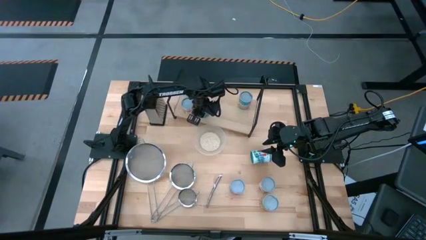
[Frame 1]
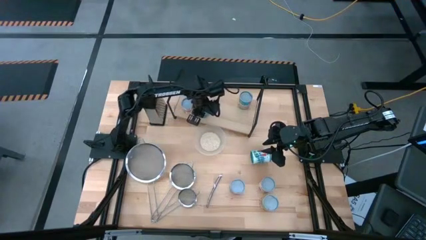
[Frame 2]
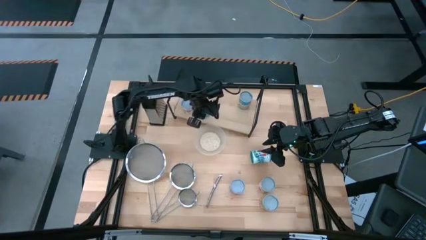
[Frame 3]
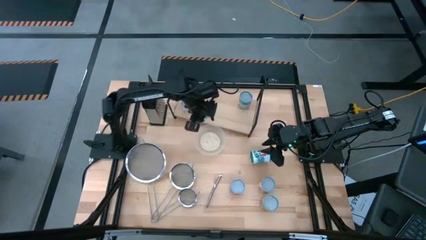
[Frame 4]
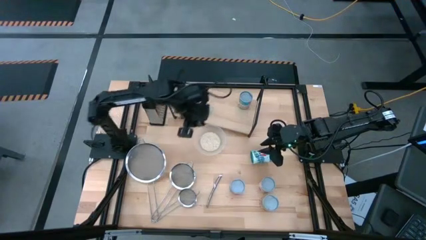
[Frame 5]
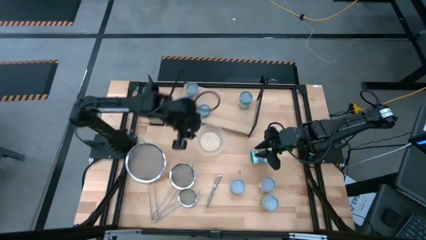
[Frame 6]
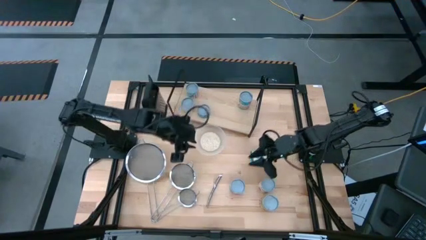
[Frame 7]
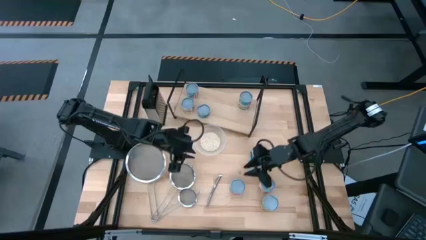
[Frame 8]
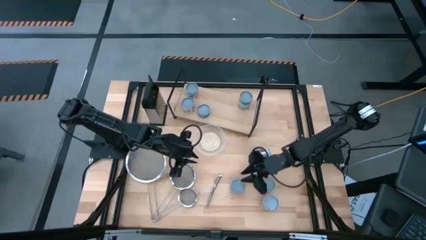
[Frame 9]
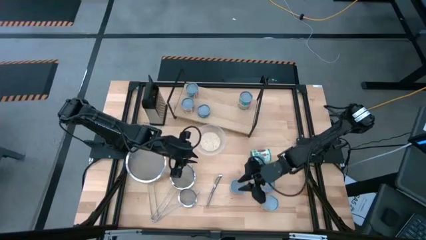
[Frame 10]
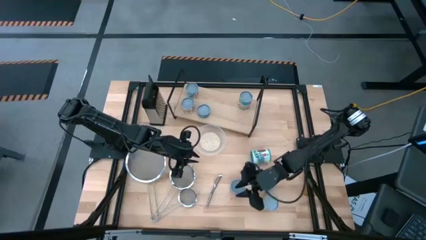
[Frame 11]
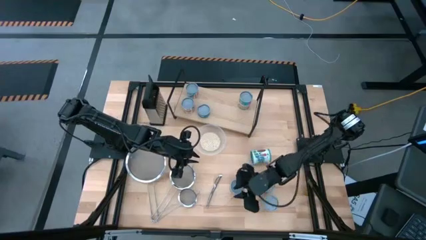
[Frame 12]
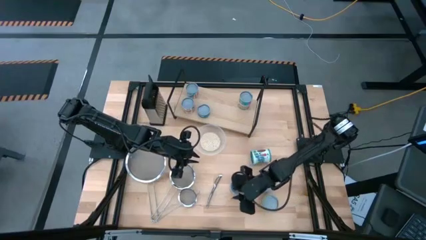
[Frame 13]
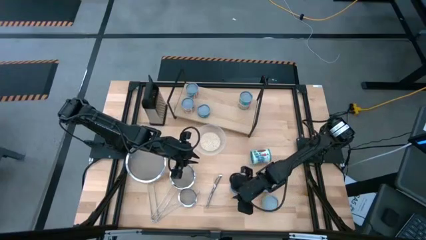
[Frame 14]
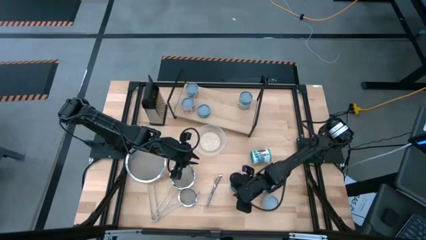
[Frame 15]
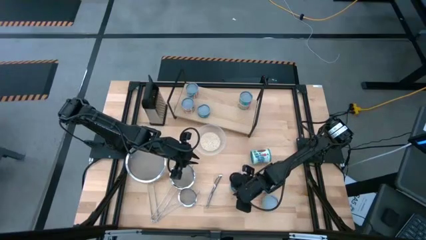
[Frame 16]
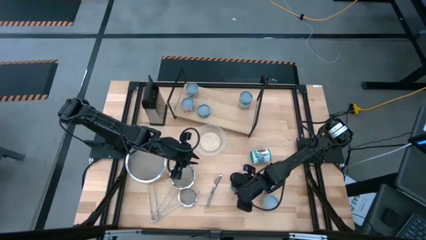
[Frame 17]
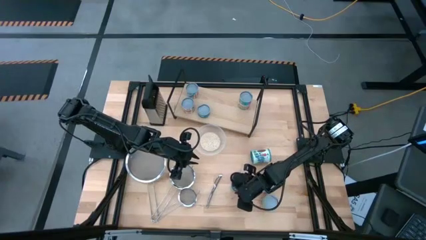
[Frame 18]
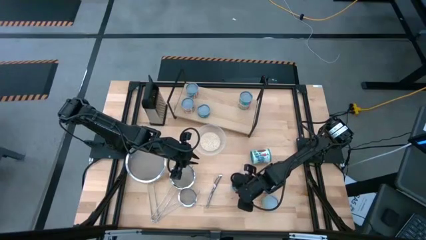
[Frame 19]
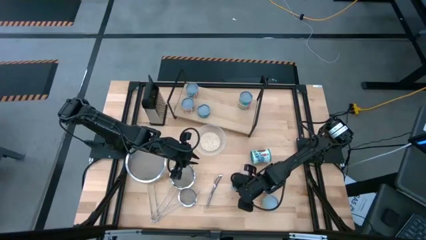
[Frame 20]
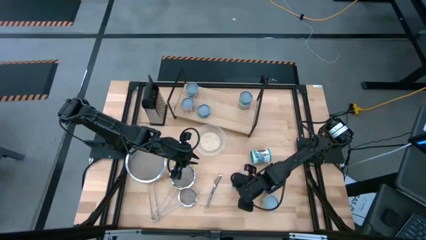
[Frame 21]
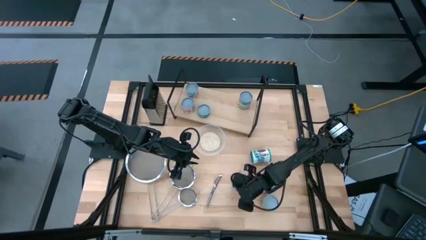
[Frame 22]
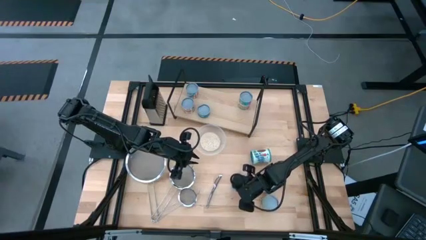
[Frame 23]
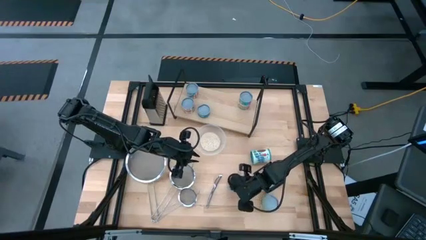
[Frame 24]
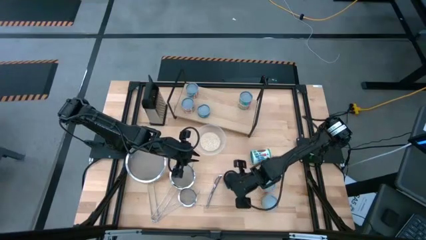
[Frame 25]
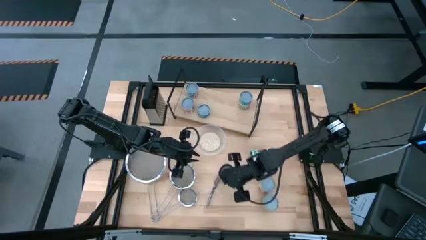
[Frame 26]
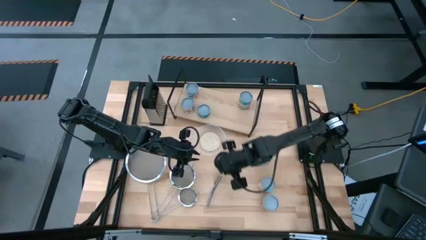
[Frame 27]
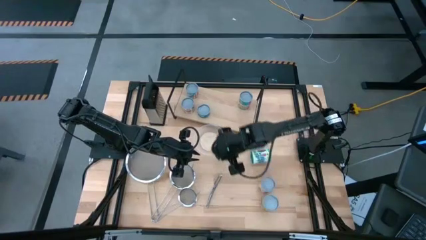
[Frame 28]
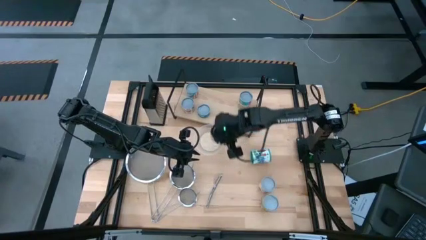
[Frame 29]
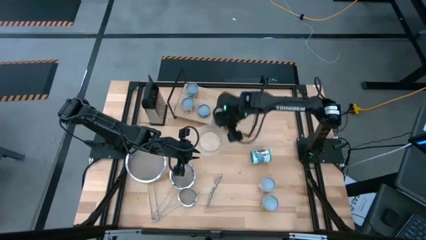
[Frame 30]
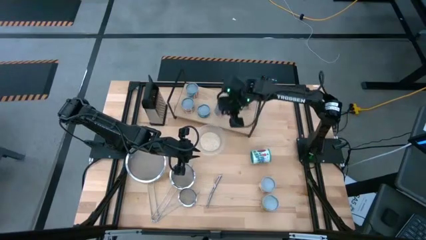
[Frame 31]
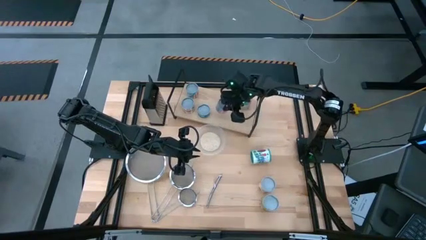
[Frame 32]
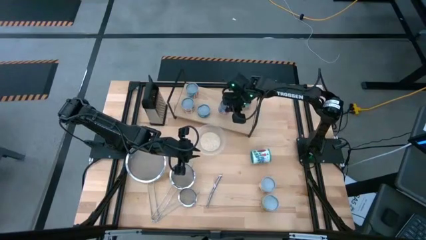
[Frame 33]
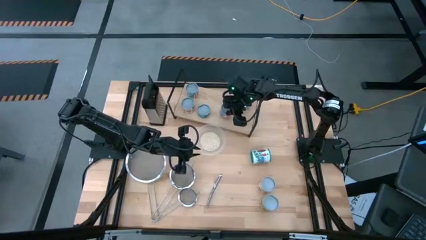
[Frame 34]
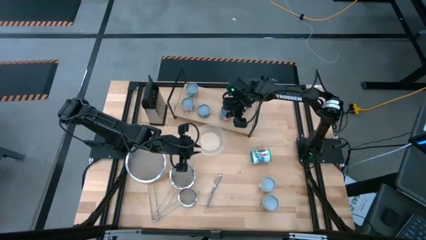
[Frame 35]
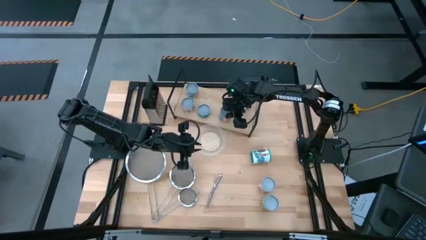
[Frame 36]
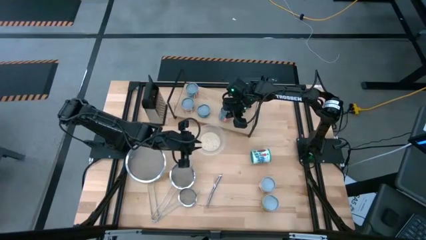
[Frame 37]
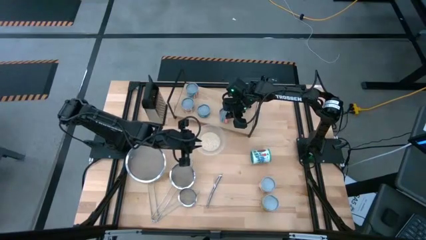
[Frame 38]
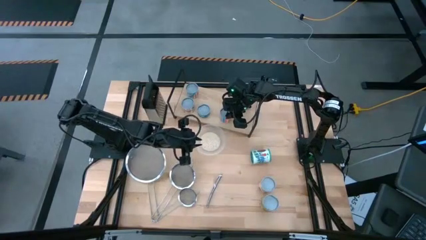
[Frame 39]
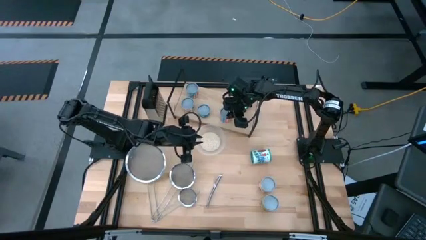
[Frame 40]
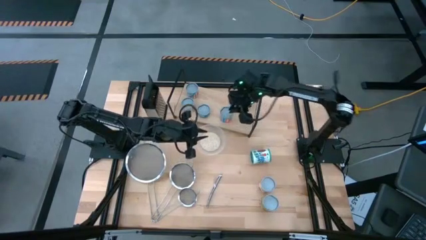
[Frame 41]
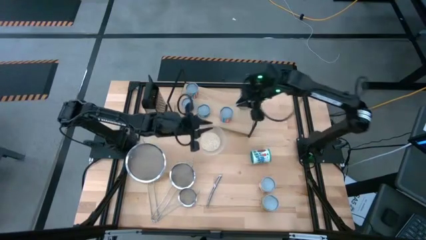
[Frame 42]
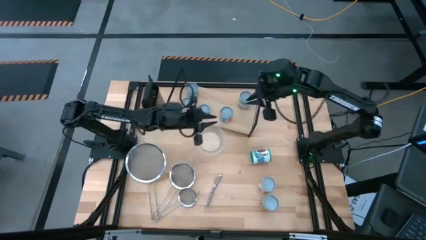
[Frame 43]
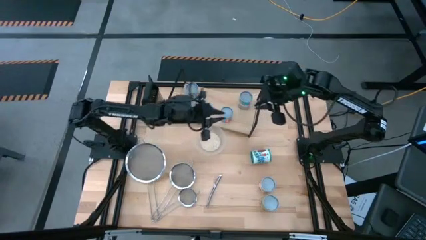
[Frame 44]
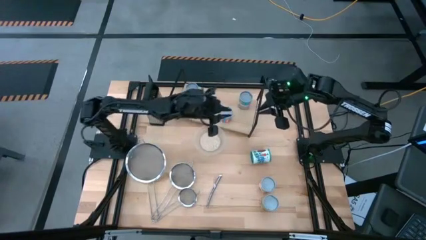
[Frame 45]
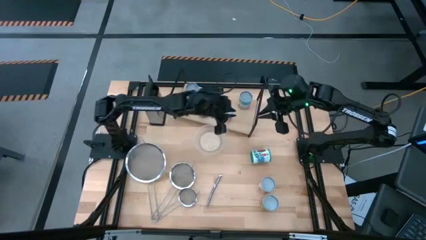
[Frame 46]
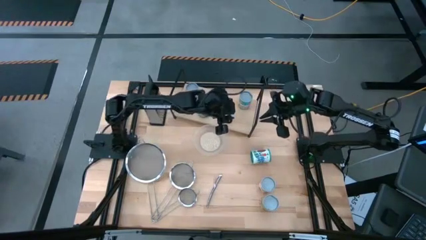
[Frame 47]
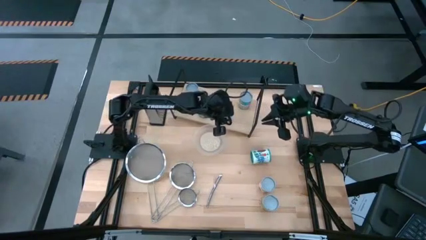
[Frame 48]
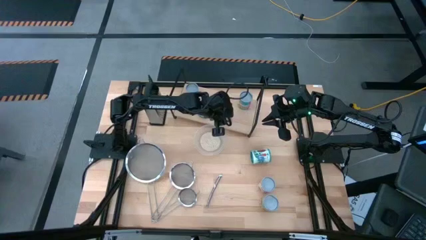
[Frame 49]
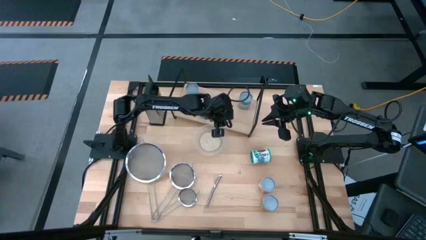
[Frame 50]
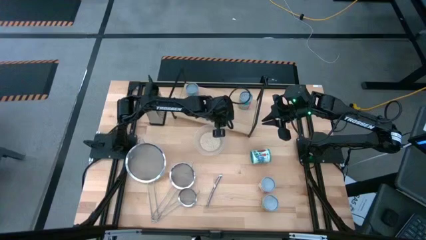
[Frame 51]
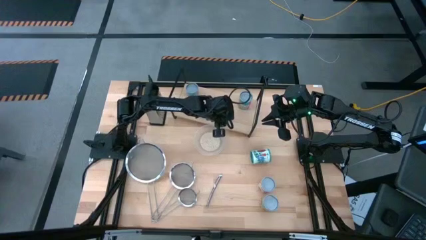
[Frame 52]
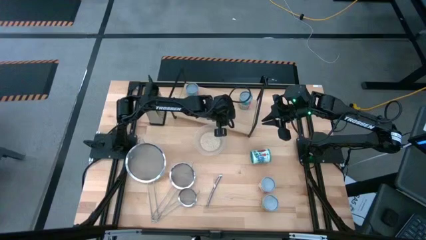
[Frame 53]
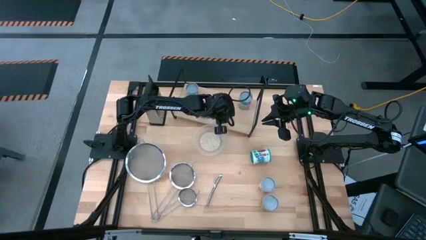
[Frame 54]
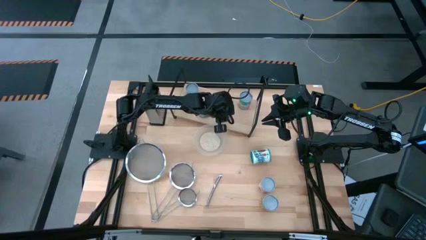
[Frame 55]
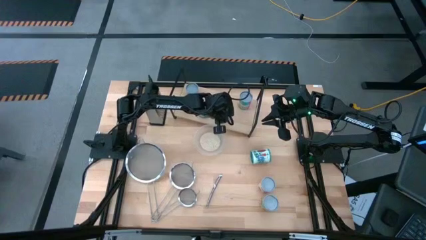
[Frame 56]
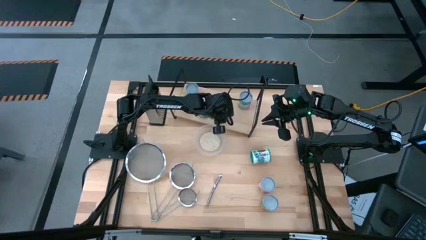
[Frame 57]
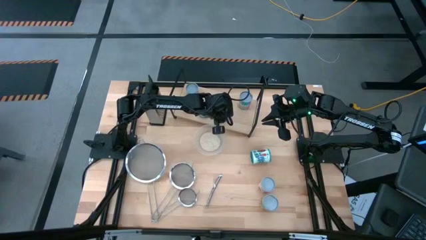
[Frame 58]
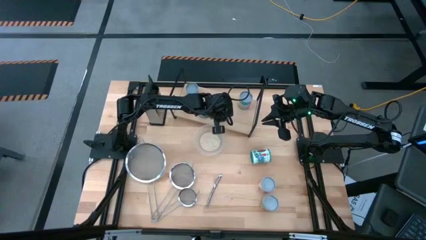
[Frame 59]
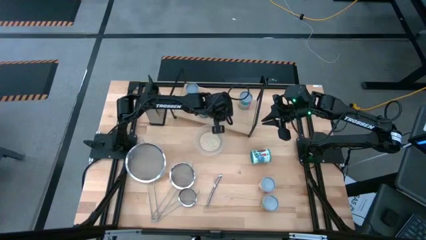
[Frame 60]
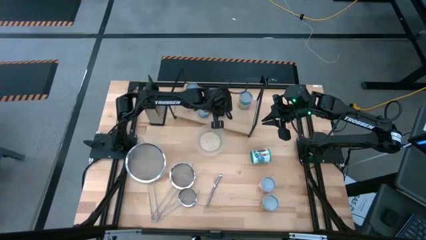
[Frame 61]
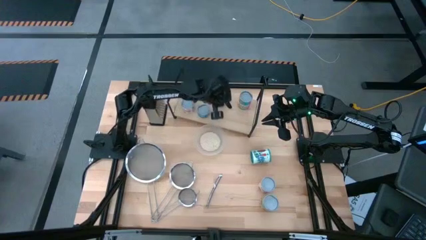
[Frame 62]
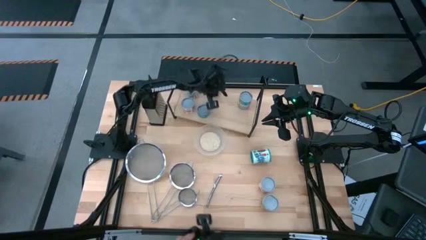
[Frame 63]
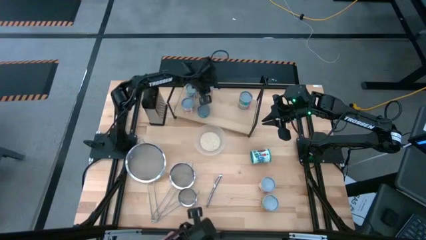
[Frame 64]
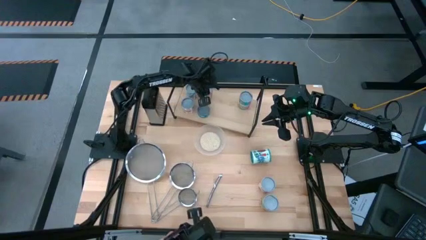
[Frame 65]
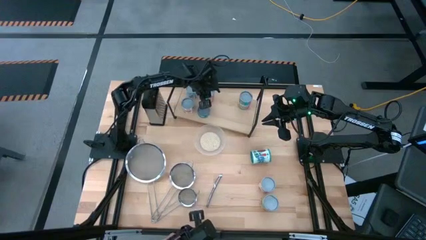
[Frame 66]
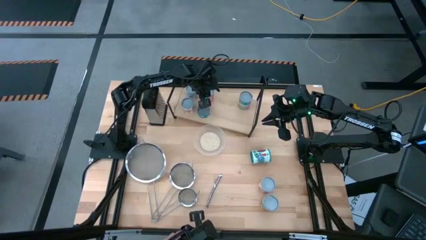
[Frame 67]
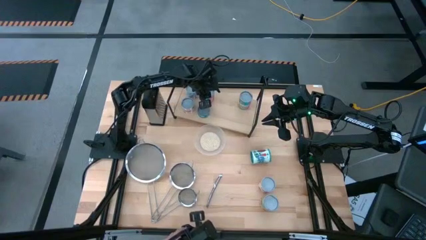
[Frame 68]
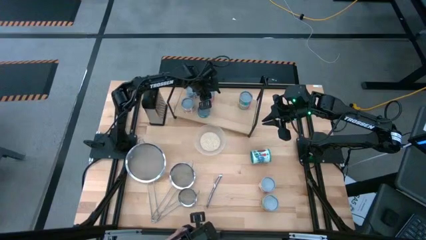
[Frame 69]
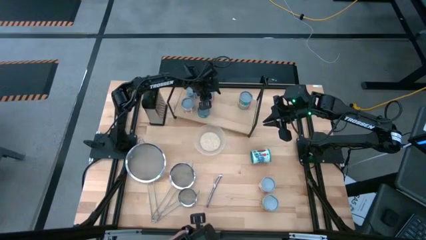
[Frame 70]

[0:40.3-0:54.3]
Task: Pick and place cans onto a shelf
Put the canned corn on the shelf
